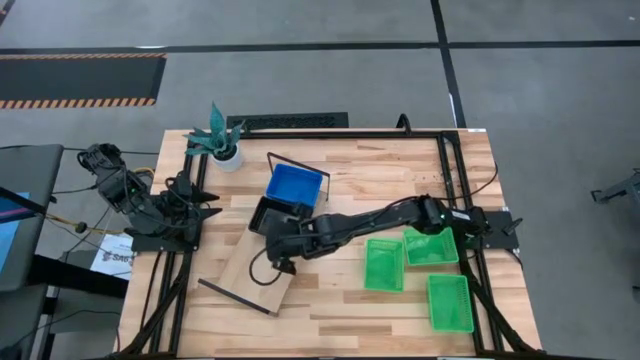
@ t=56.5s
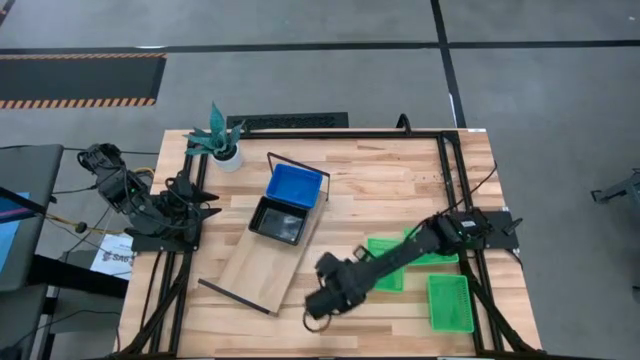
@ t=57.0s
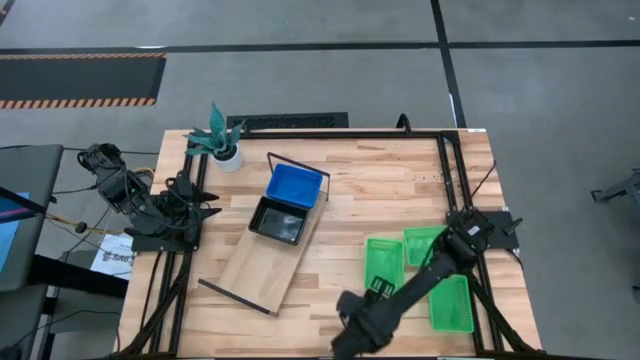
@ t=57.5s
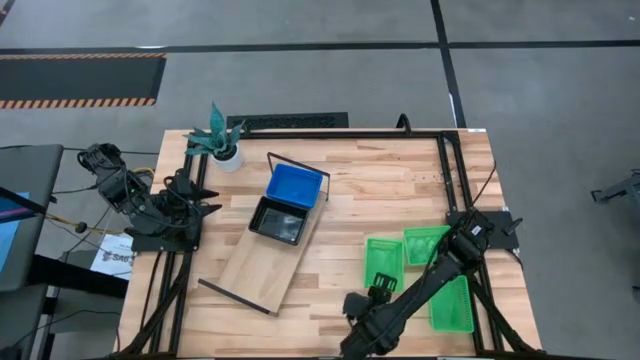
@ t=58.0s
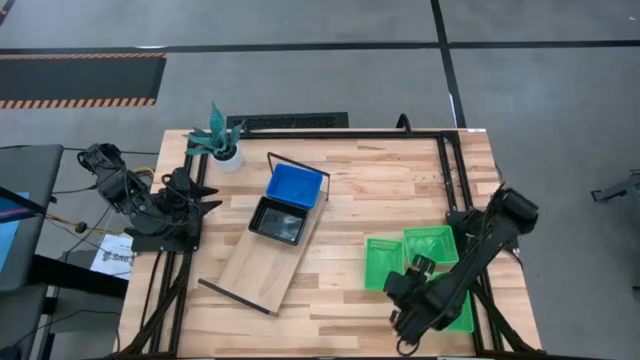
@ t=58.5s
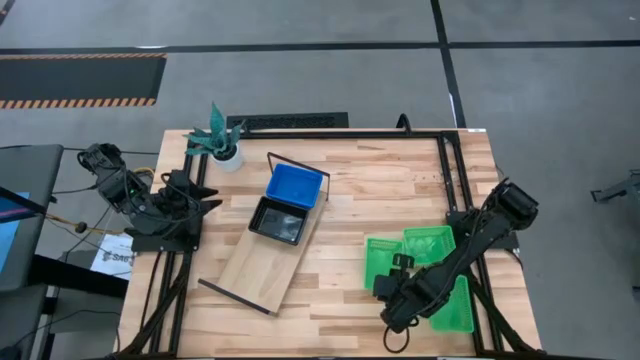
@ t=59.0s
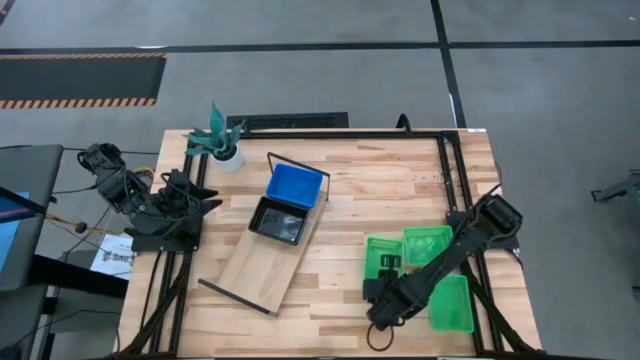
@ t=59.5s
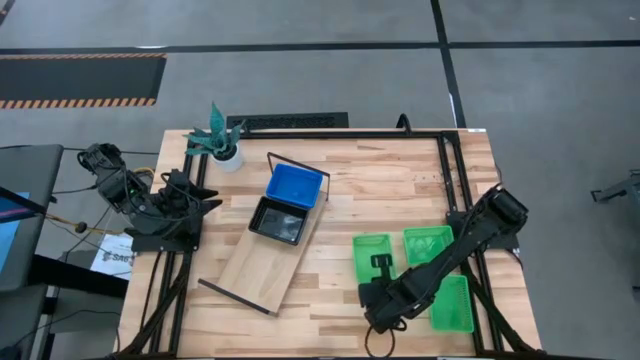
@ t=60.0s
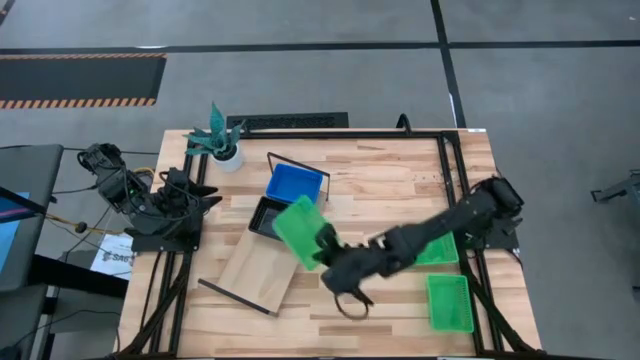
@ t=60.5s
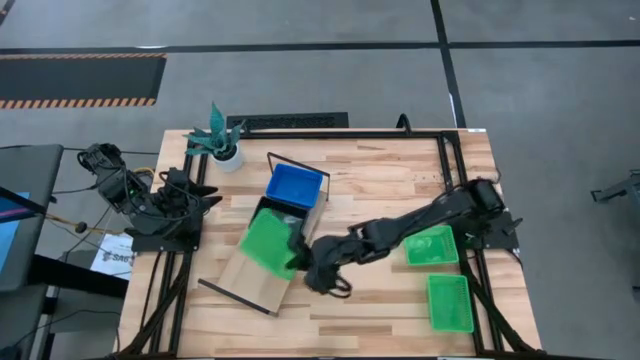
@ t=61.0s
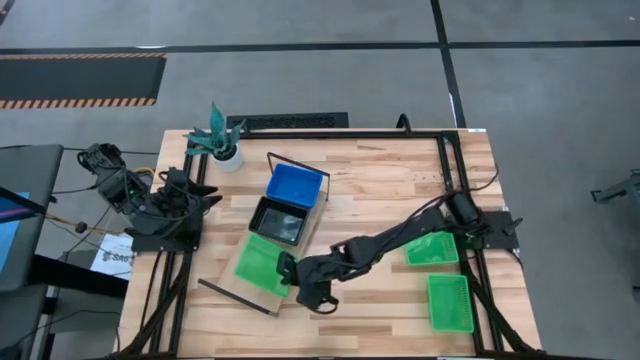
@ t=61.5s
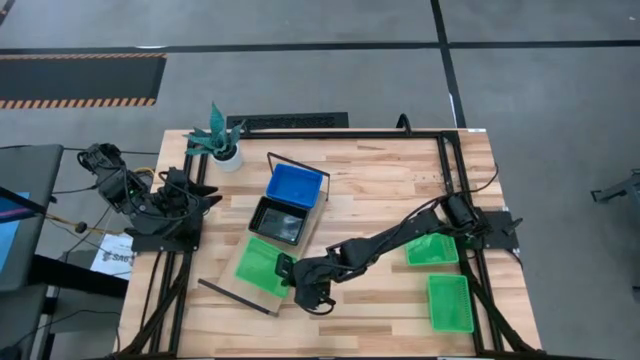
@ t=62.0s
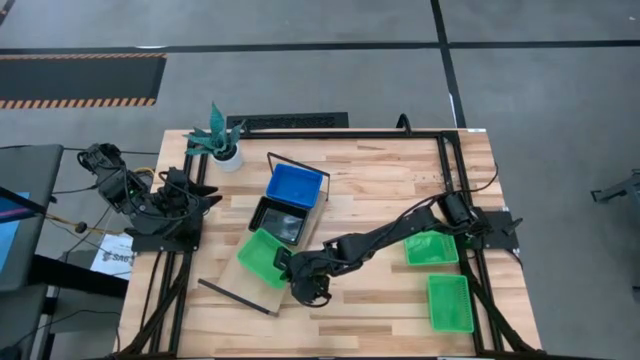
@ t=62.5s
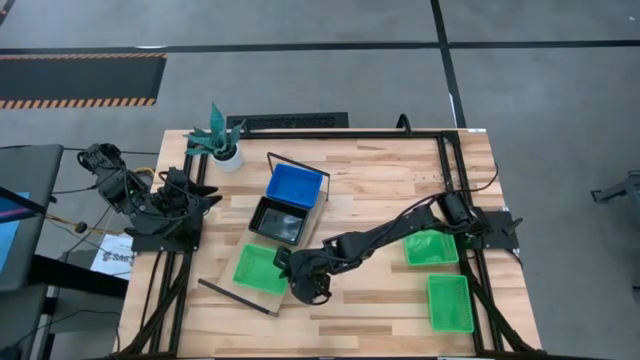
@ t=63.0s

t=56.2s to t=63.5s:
Task: Stack baskets on shelf by color
Put the left green bin on the shelf

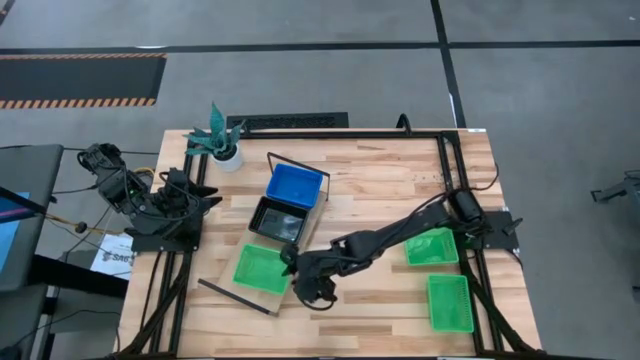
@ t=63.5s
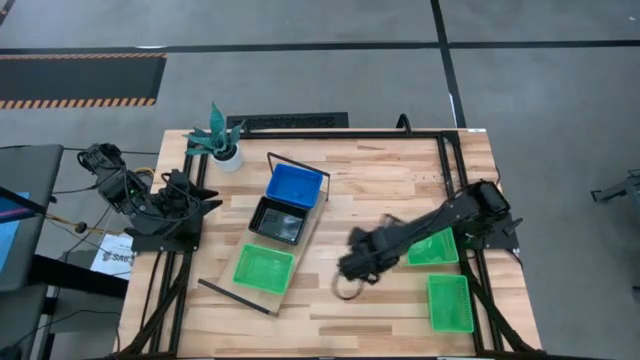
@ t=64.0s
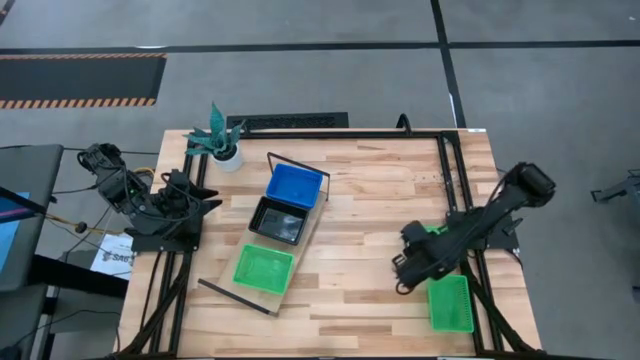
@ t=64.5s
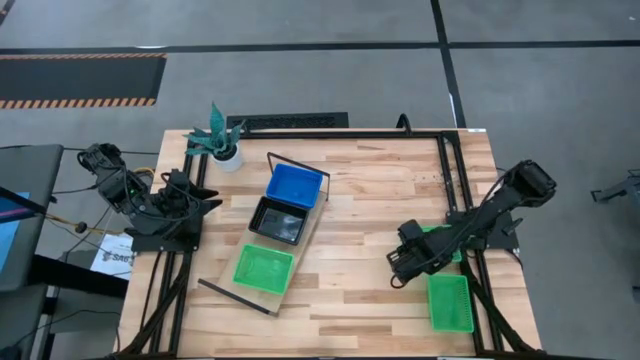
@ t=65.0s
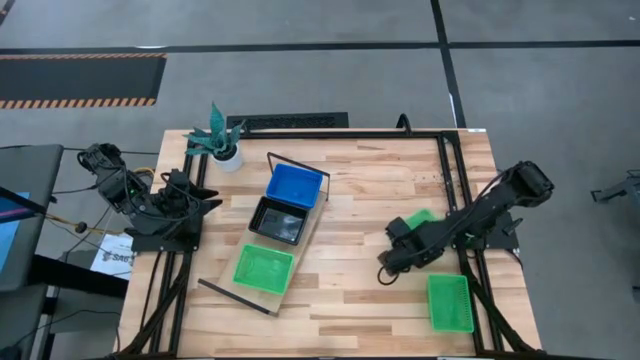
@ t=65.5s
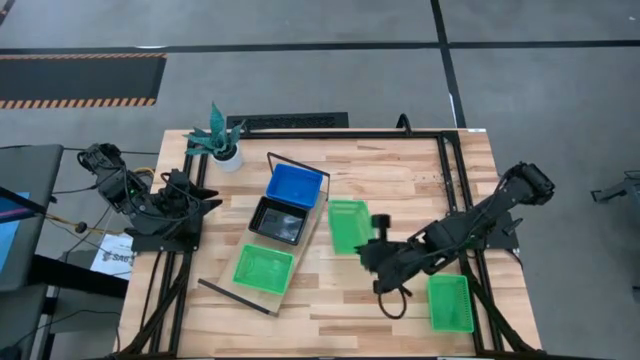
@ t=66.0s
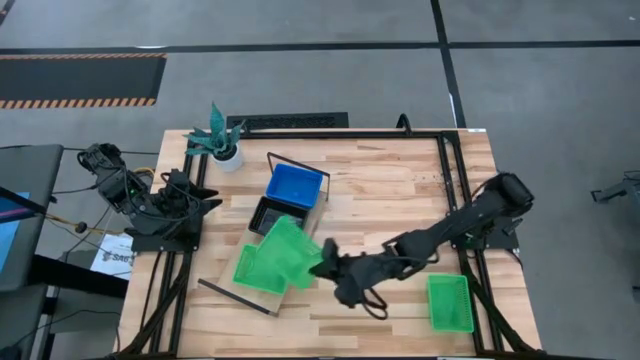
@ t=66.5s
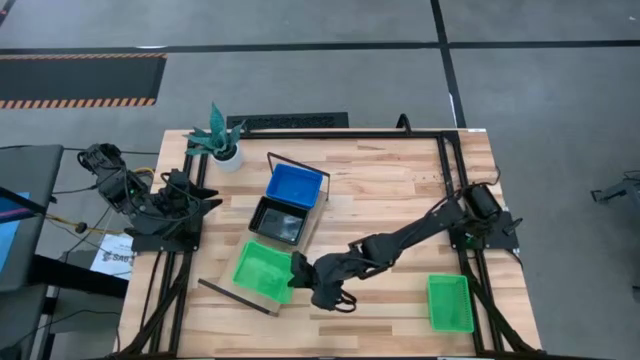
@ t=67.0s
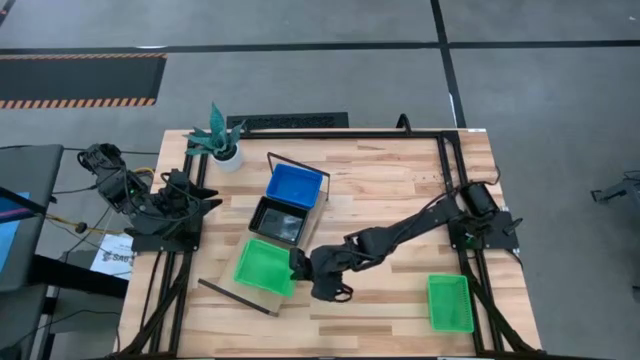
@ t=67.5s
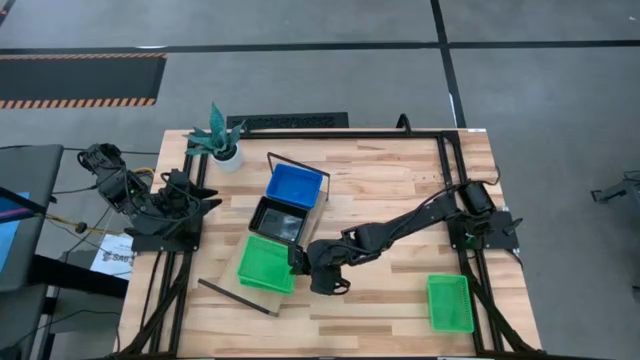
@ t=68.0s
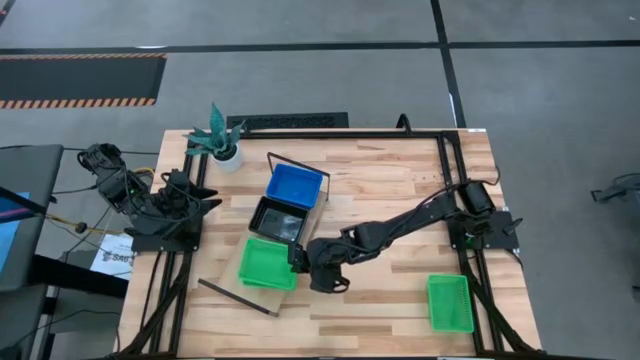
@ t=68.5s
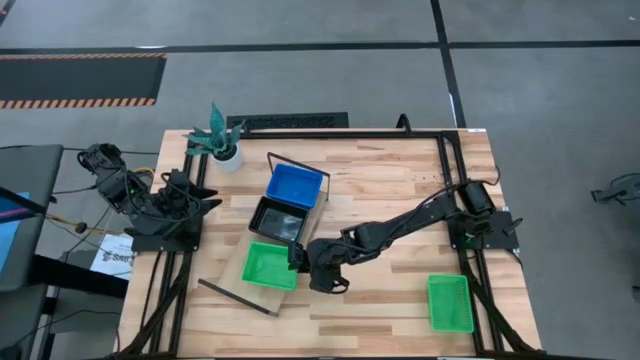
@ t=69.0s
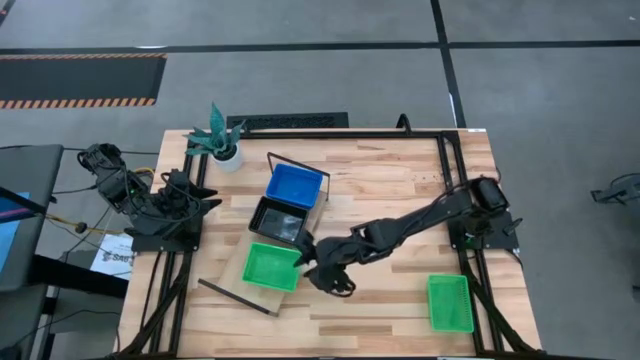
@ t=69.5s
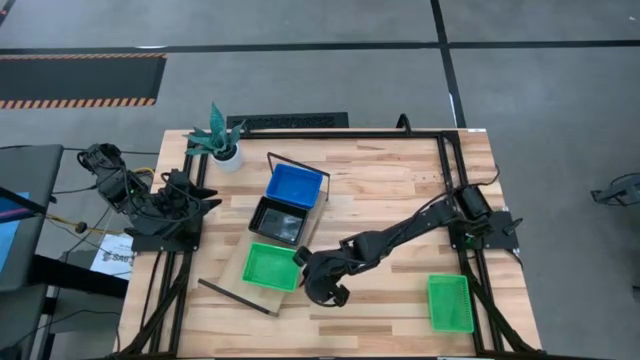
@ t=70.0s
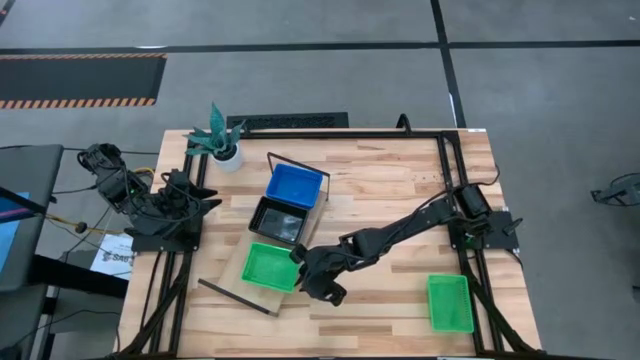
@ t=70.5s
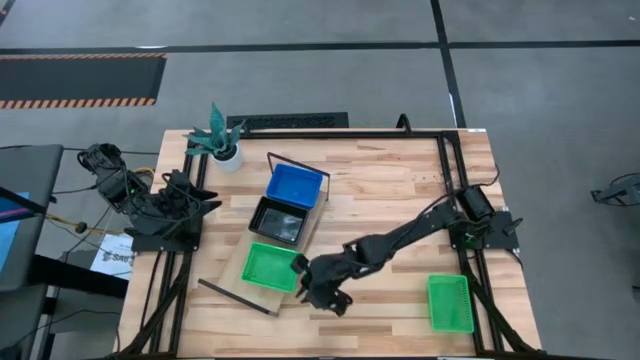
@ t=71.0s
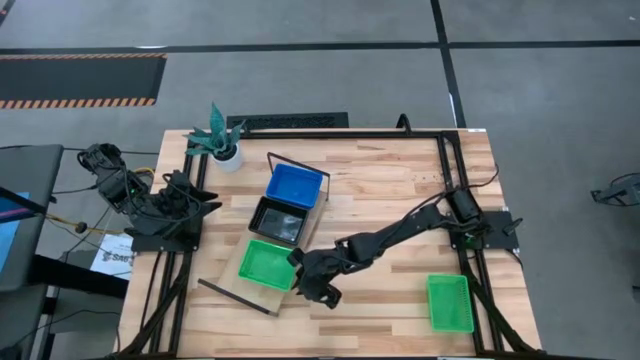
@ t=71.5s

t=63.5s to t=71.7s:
Stack the top green bin on top of the green bin on the shelf

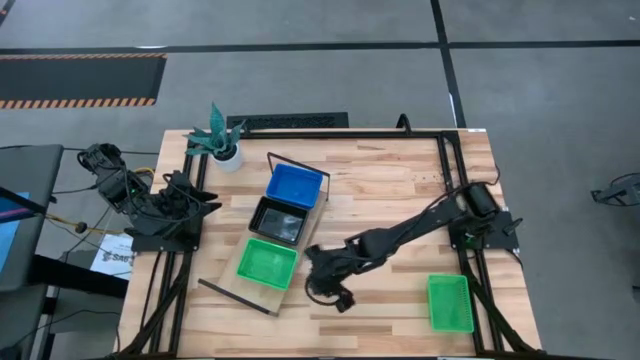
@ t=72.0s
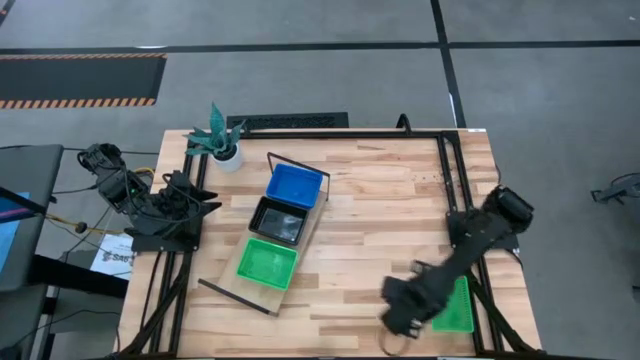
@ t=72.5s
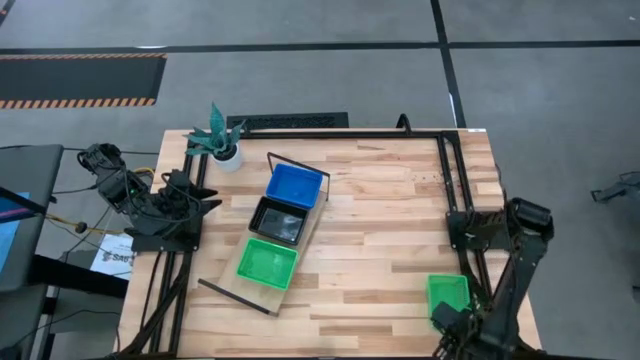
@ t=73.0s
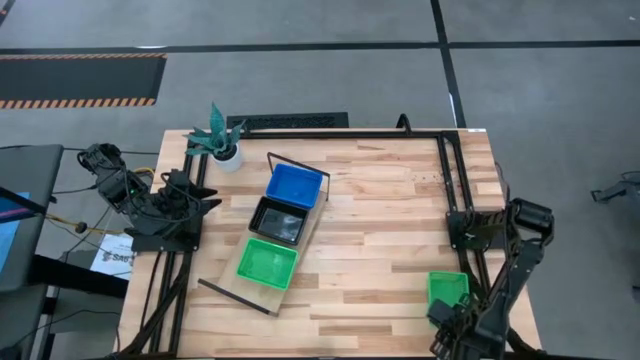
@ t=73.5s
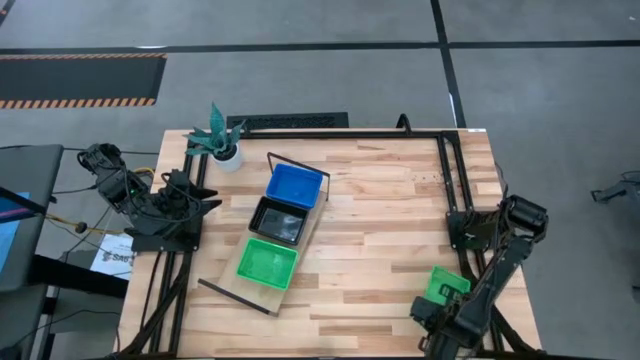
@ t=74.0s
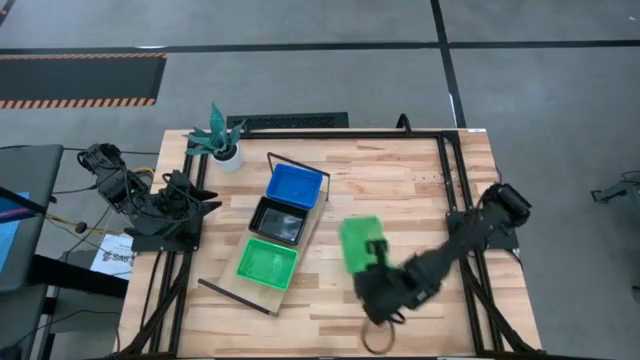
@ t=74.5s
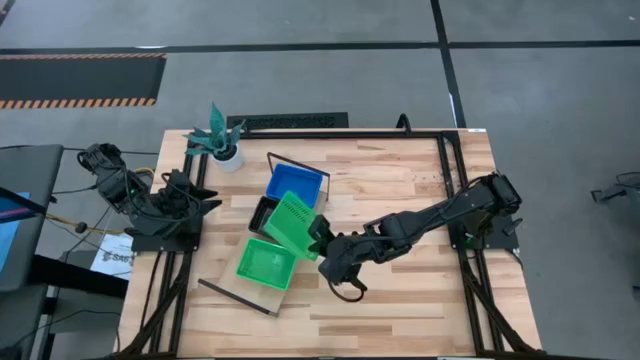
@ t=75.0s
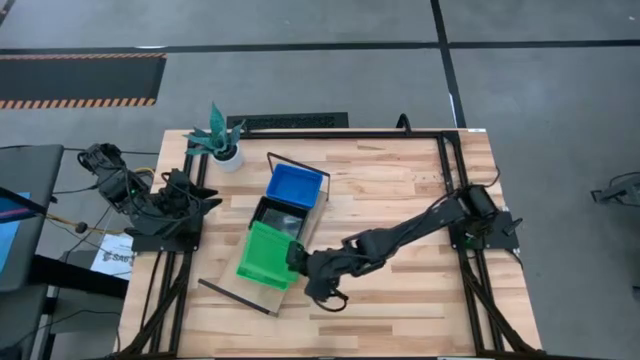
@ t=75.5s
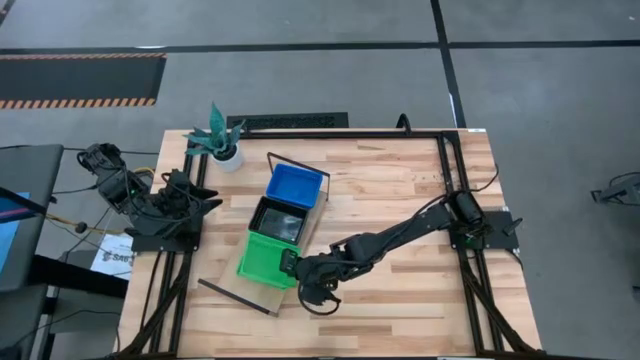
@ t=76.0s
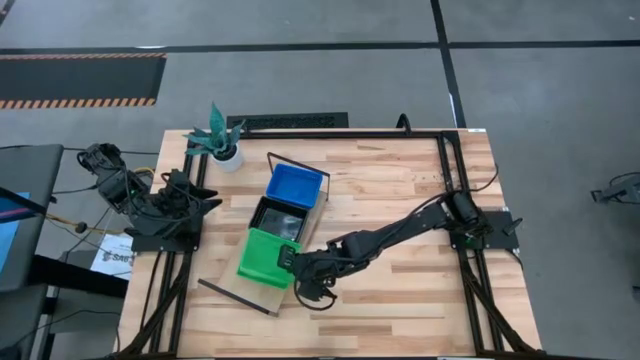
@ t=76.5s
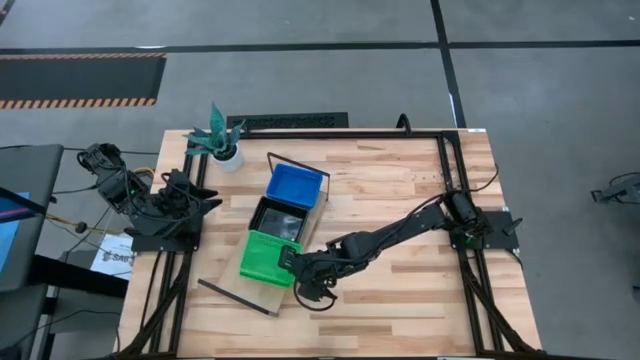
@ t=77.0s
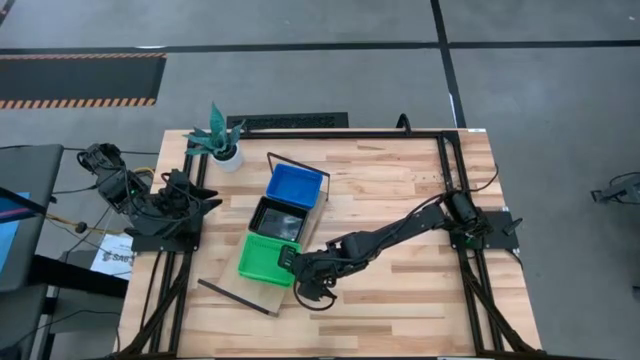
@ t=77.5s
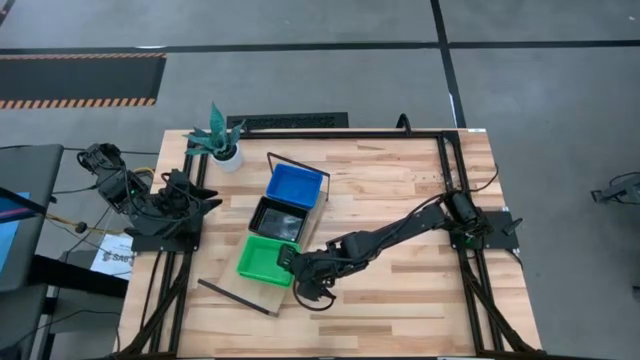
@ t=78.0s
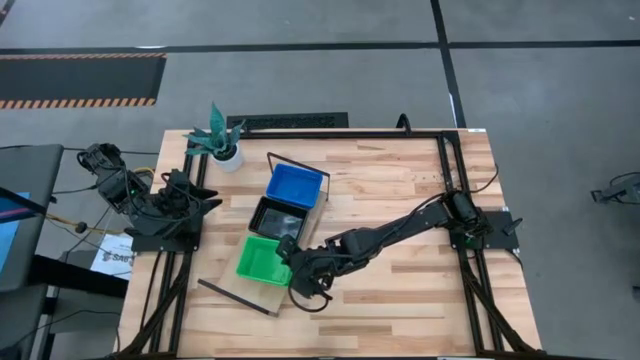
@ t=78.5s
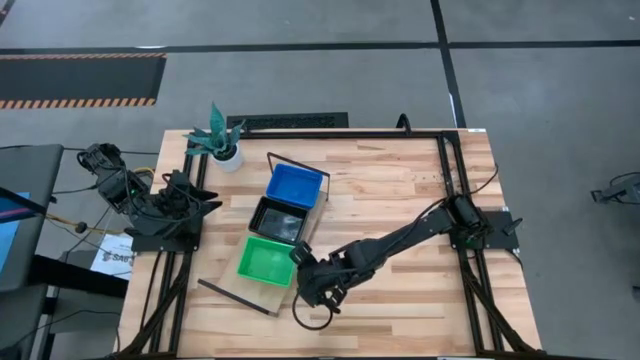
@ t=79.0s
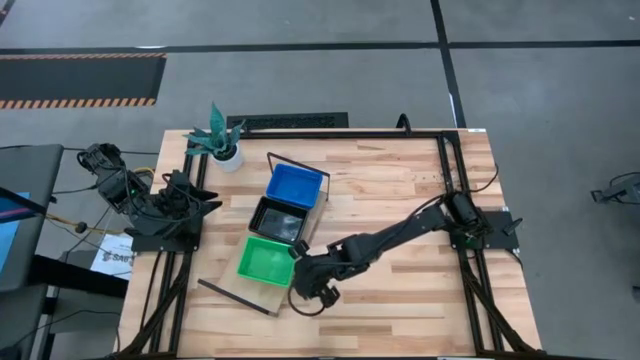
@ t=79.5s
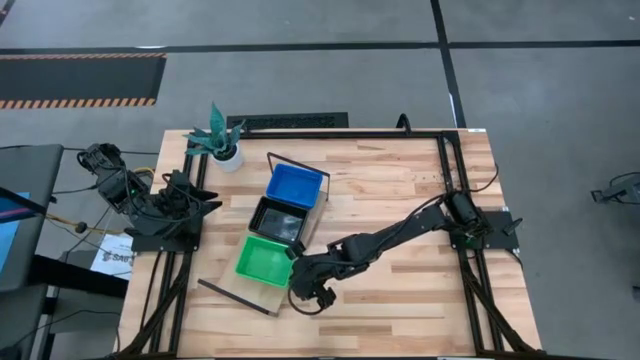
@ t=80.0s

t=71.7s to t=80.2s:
Stack the green bin on top of the green bins on the shelf
